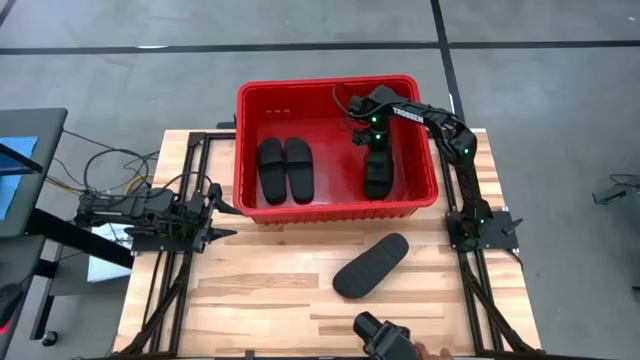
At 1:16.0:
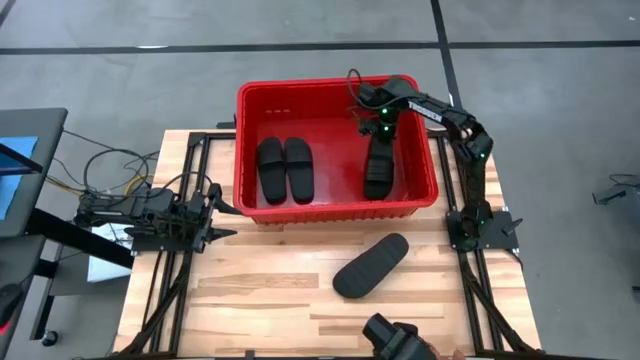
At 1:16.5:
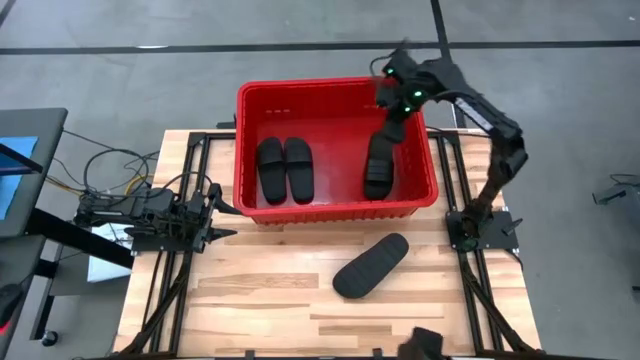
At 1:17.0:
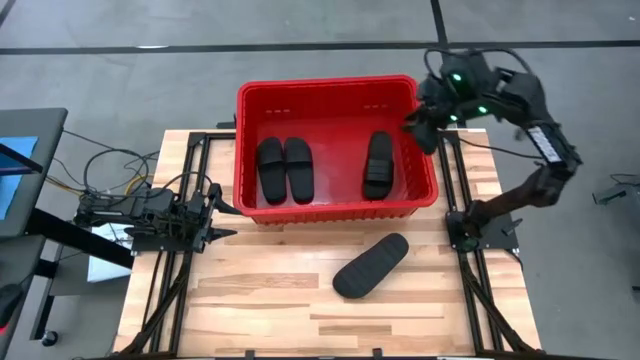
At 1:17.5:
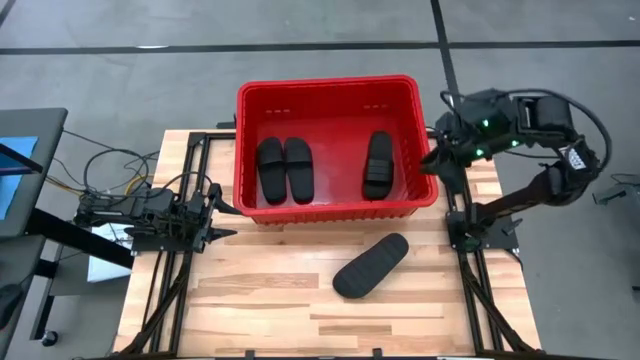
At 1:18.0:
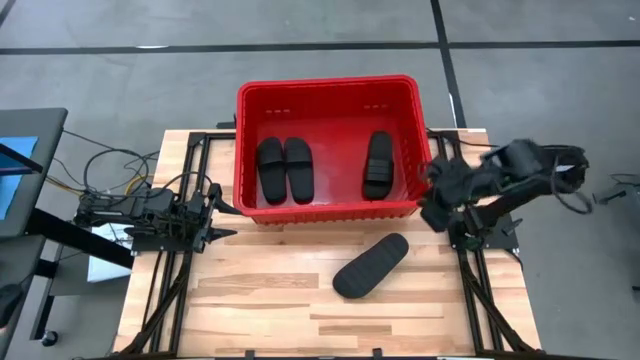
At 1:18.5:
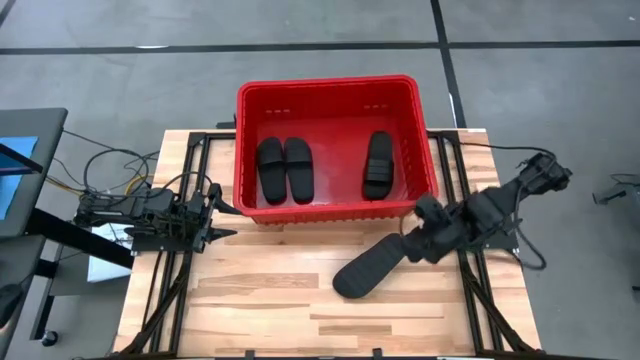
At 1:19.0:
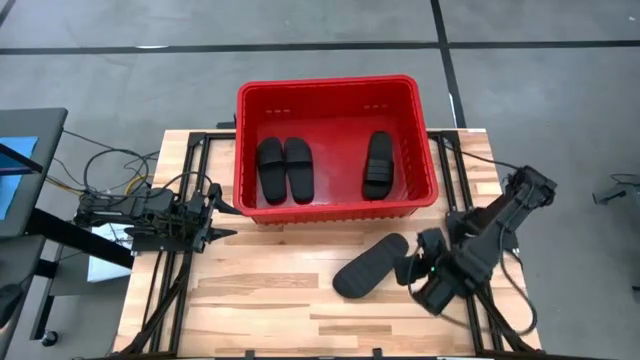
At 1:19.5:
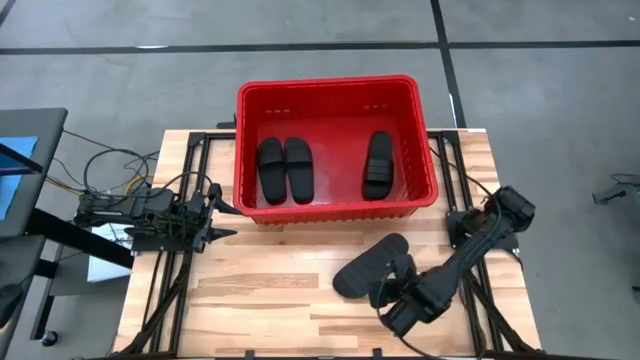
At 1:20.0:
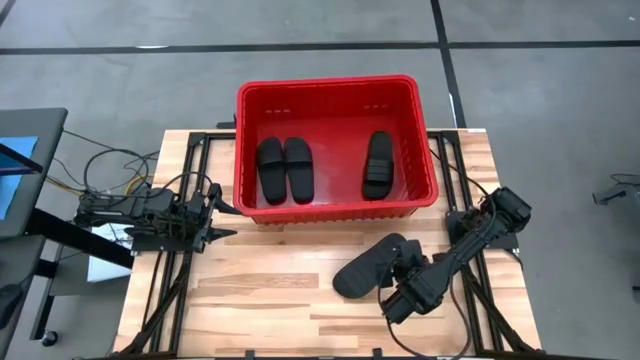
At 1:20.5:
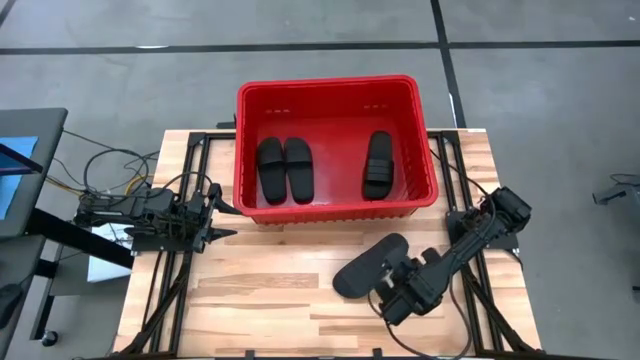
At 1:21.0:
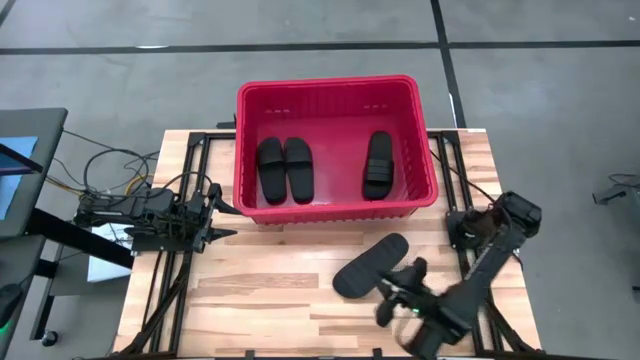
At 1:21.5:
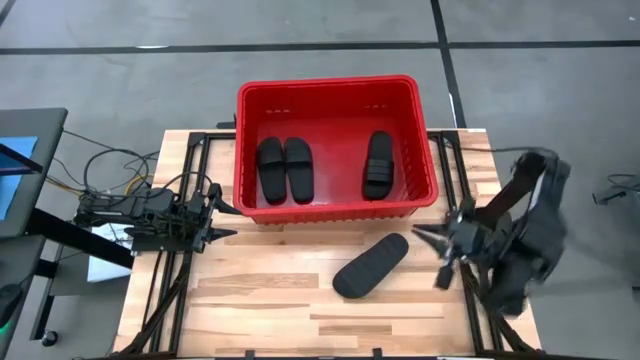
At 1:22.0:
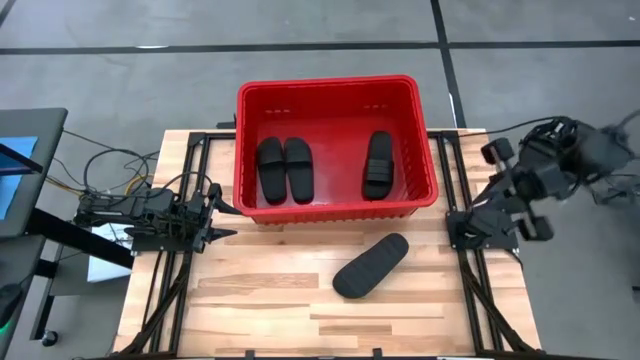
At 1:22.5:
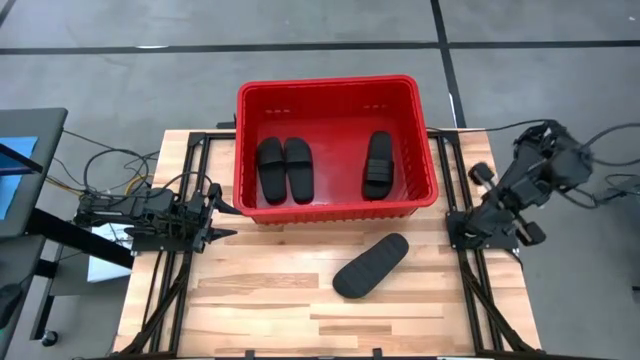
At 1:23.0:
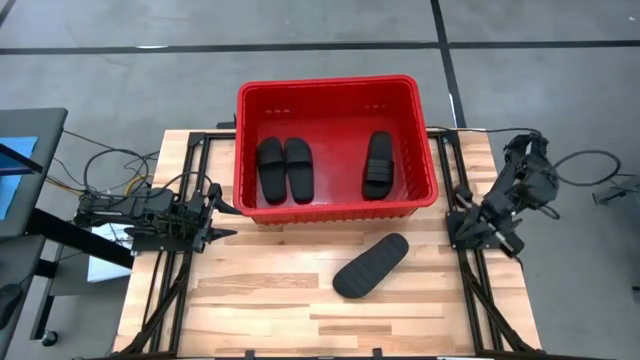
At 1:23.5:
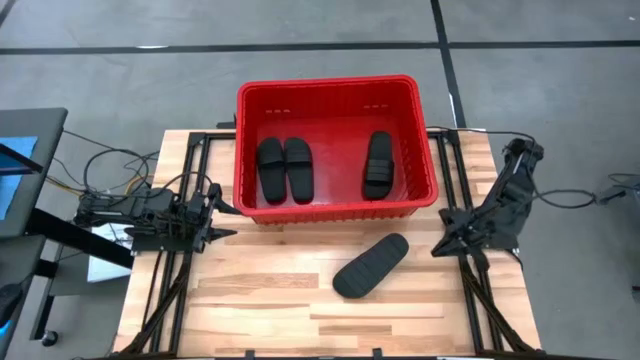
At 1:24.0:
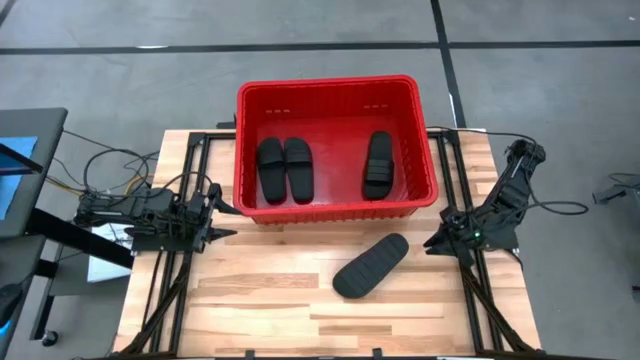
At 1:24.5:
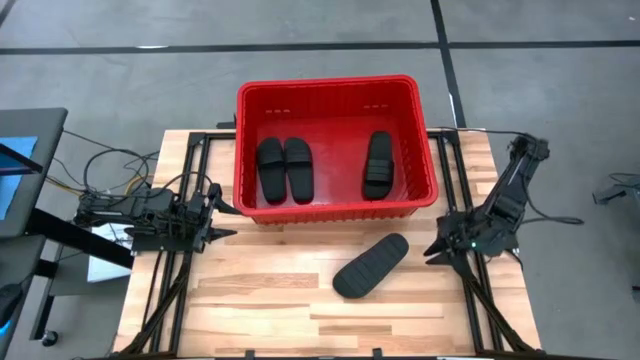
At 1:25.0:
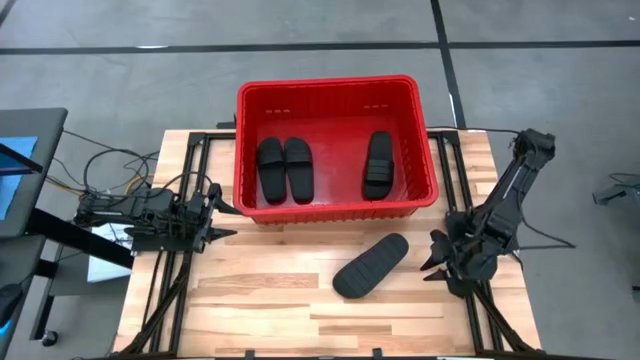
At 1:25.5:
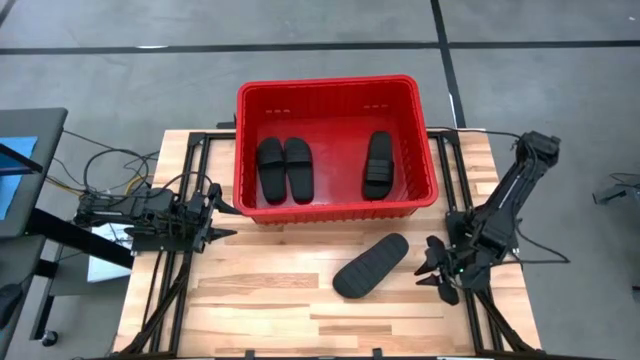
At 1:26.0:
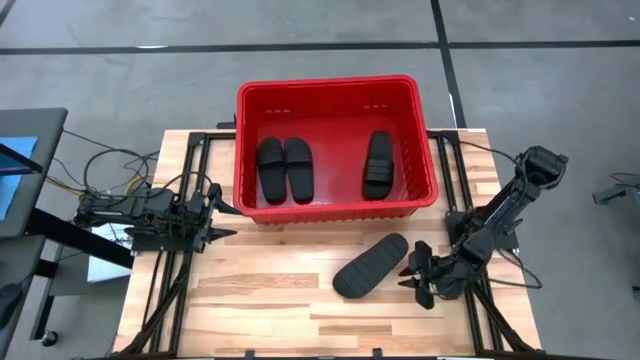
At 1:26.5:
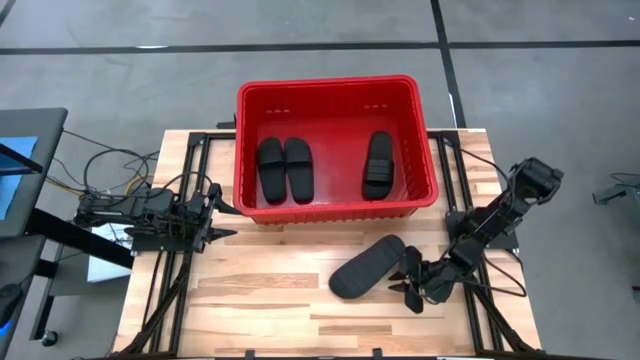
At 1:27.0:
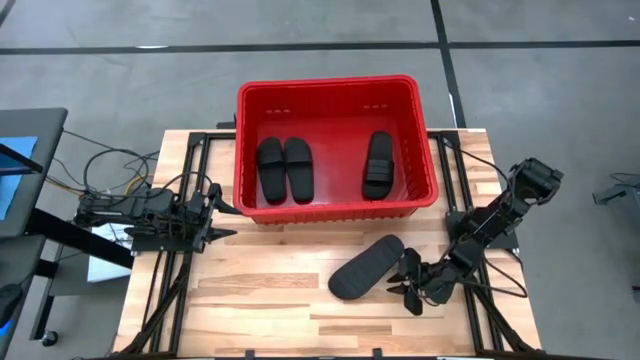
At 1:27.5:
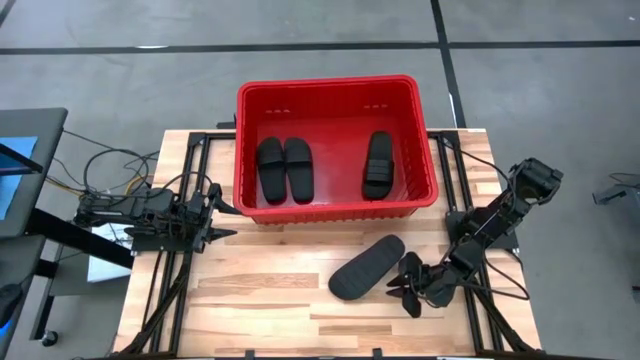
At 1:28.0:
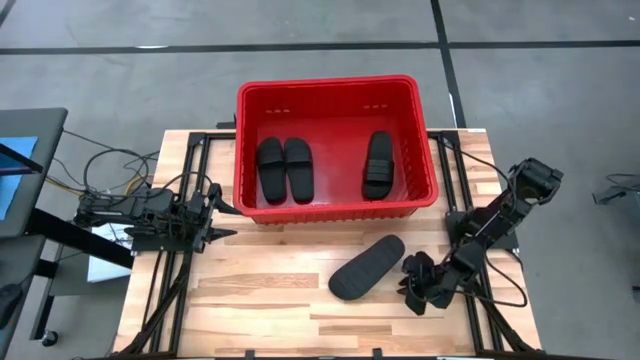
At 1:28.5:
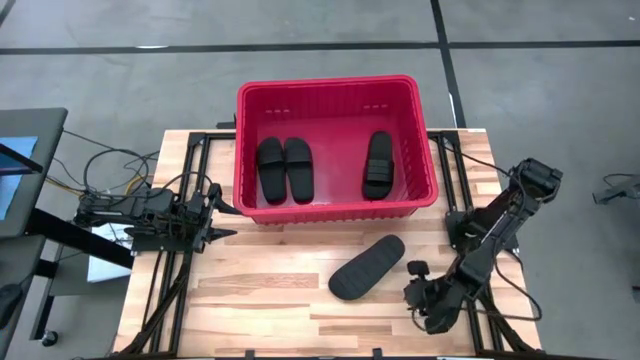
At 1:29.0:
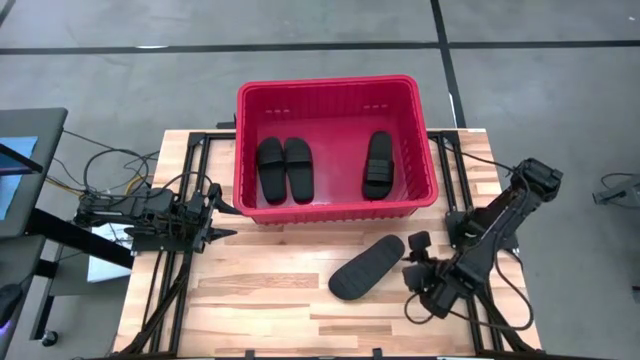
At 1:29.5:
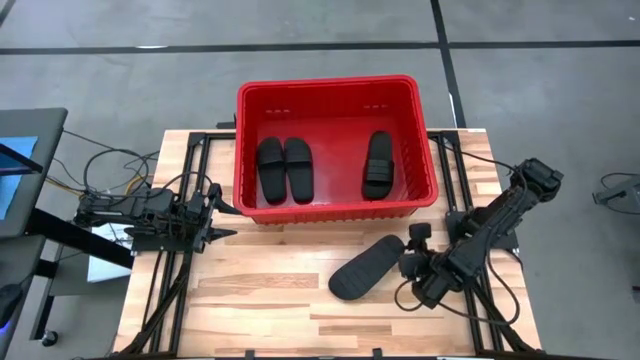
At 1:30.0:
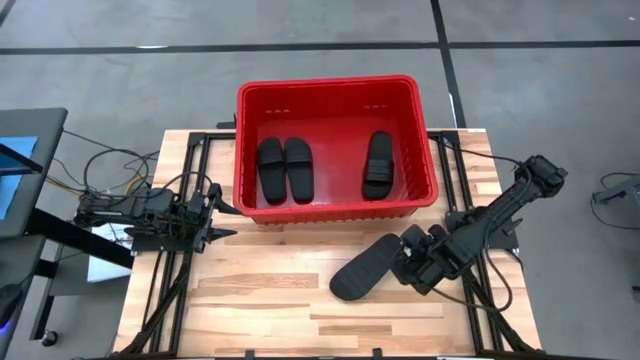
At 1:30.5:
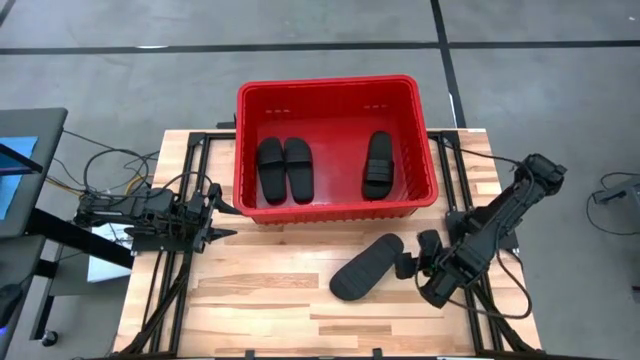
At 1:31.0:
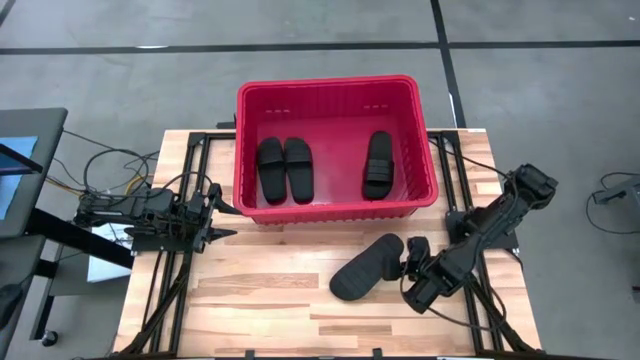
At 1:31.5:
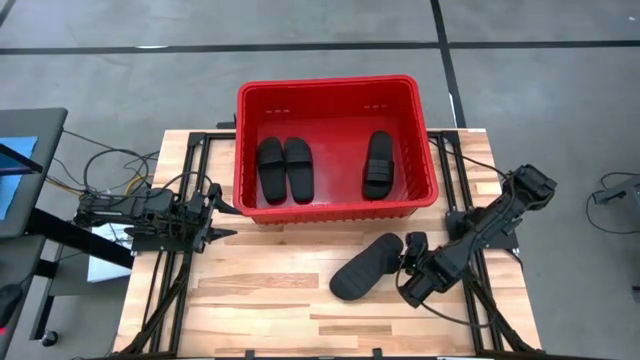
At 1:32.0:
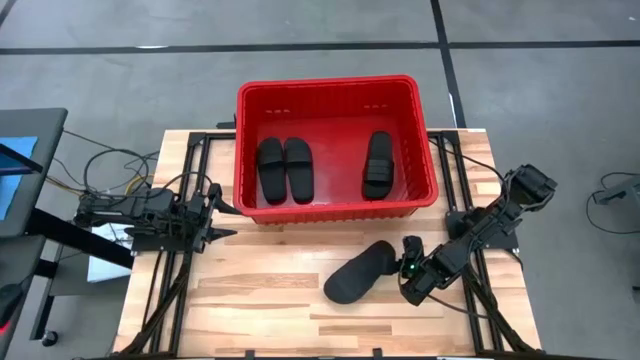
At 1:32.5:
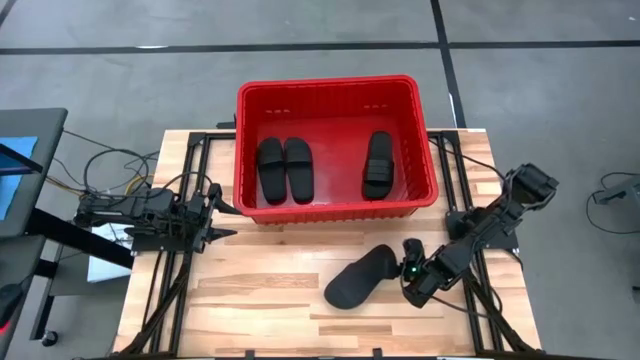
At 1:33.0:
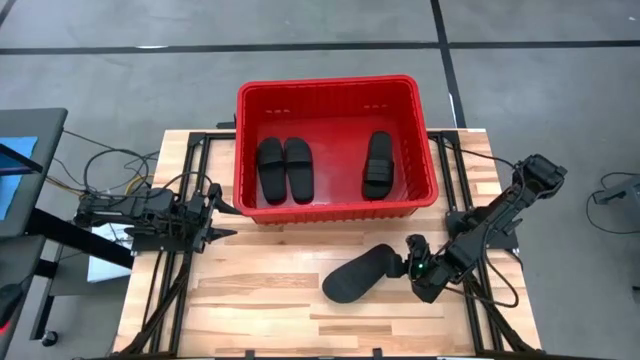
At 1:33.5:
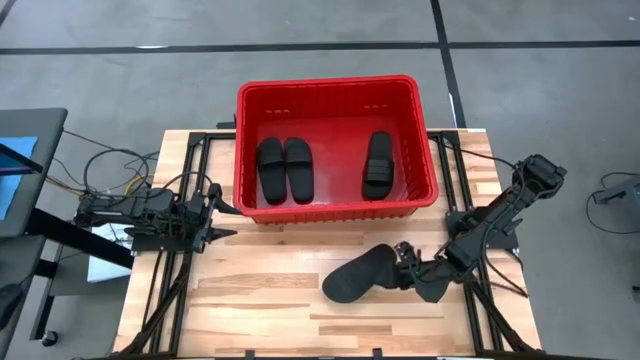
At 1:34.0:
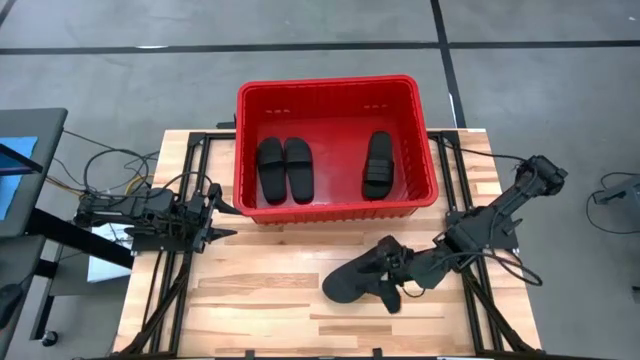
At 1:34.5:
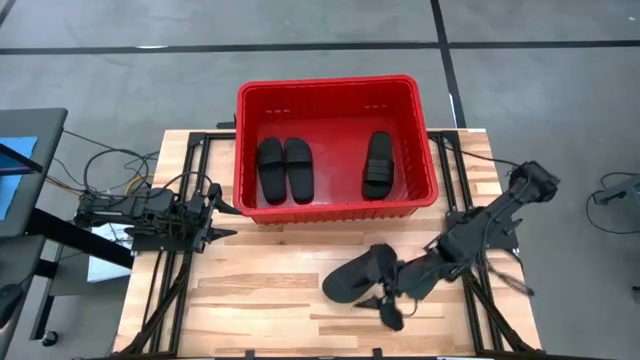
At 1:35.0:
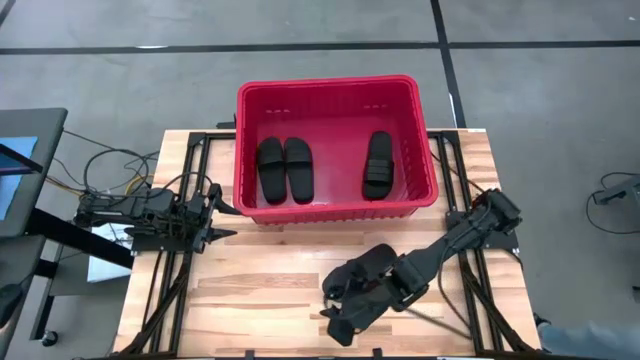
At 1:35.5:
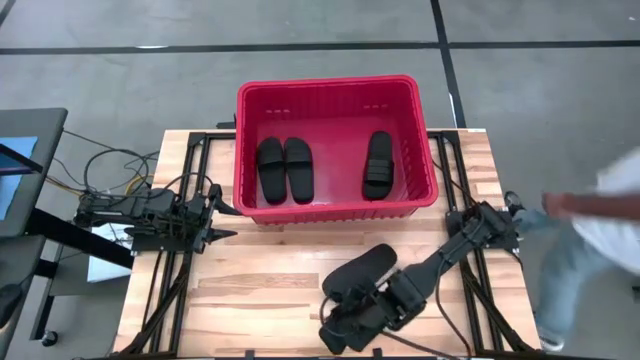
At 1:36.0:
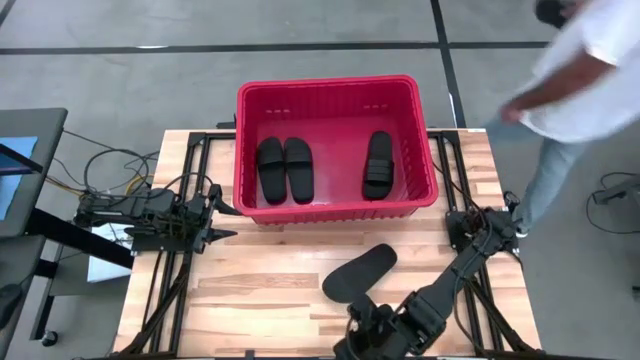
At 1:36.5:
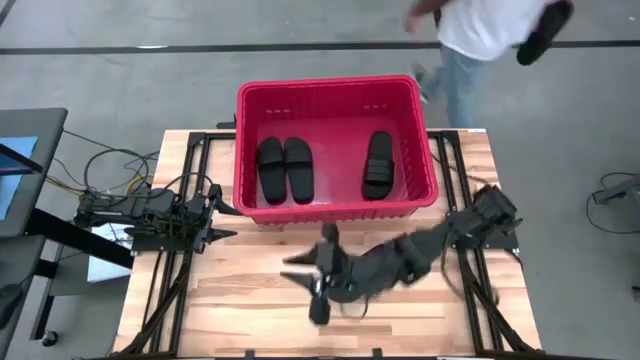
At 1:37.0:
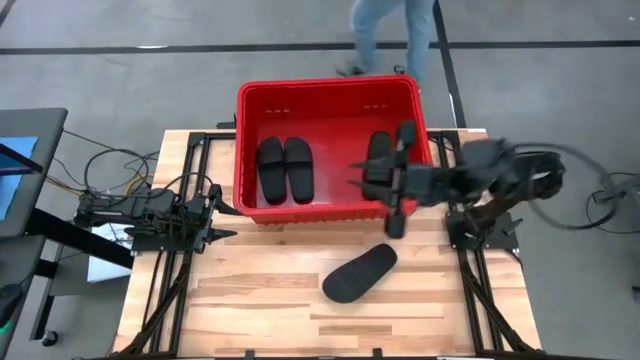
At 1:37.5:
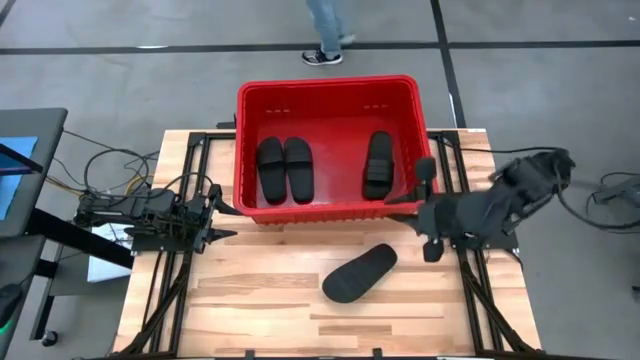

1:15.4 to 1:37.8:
Task: Pick and place slides into bin
Put the black slides into the red bin
